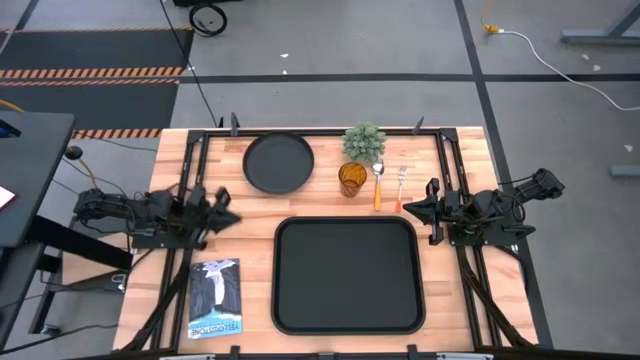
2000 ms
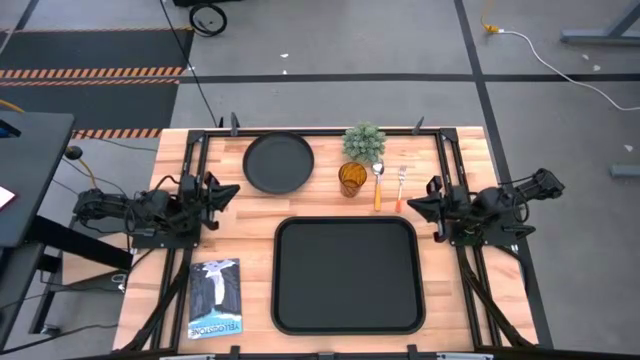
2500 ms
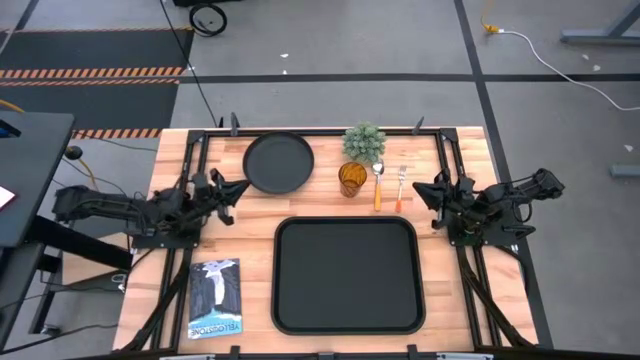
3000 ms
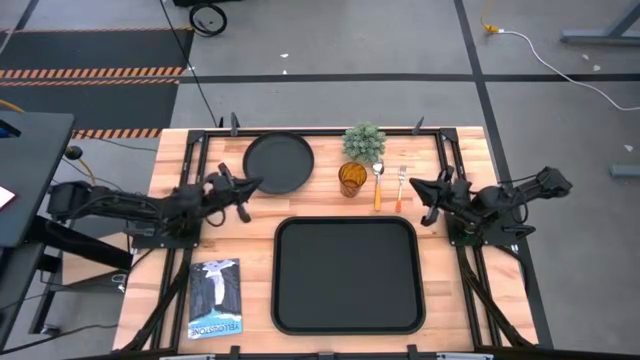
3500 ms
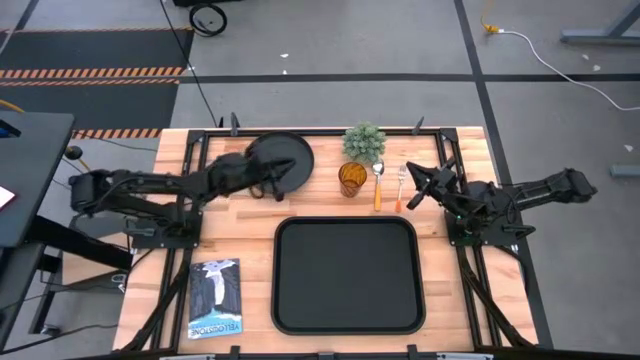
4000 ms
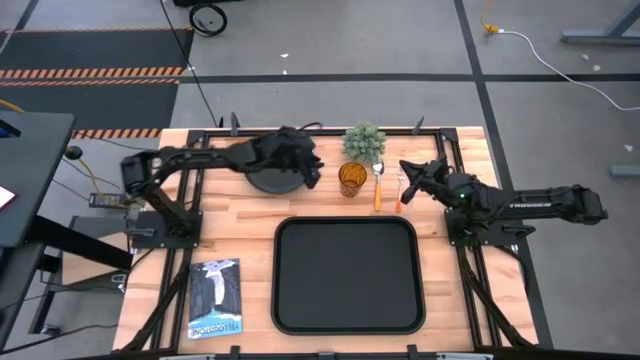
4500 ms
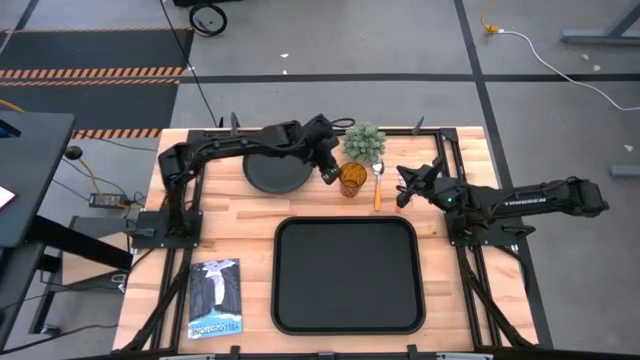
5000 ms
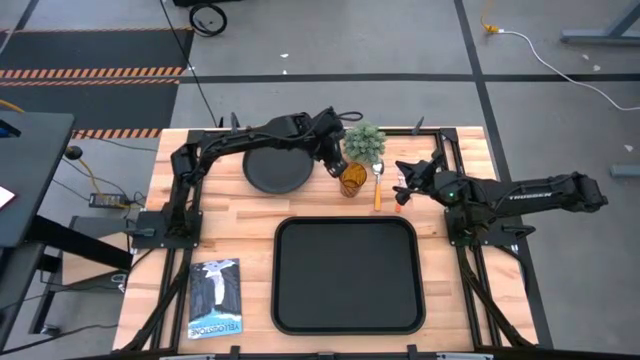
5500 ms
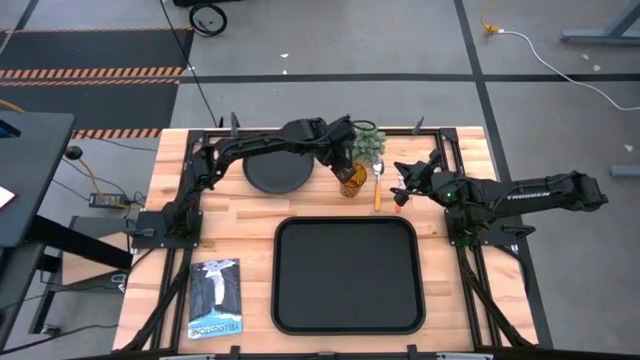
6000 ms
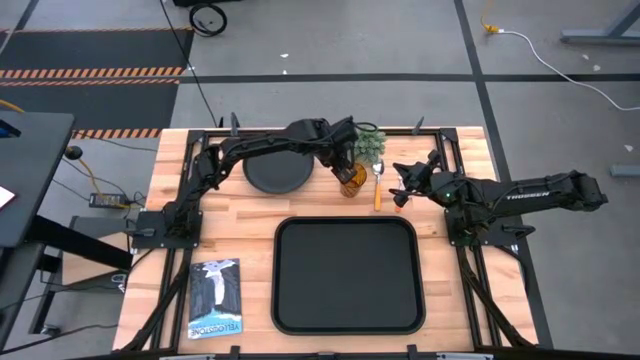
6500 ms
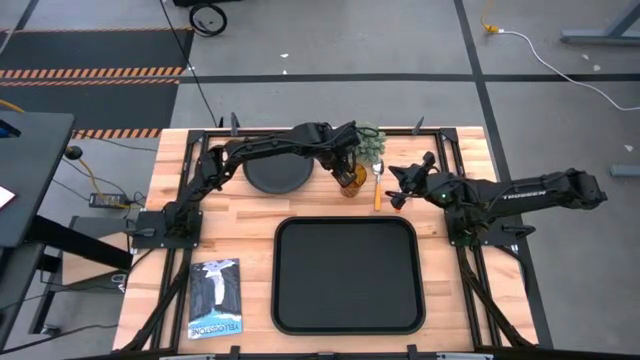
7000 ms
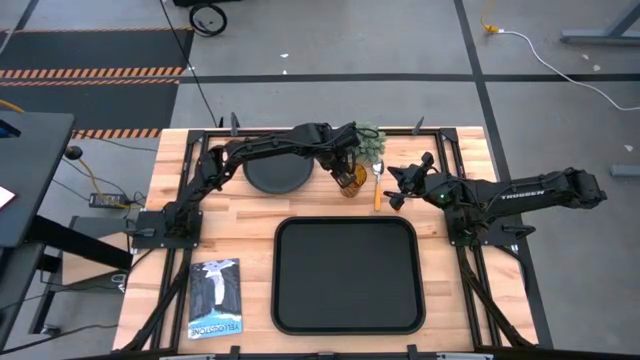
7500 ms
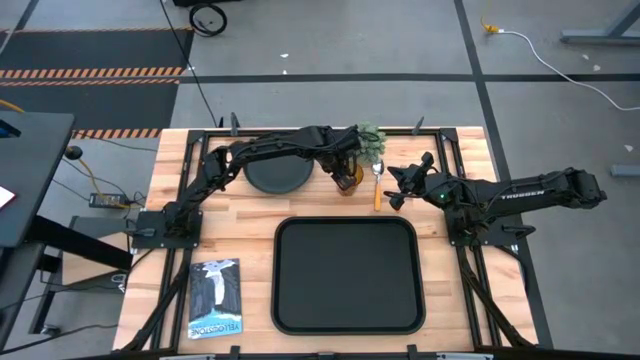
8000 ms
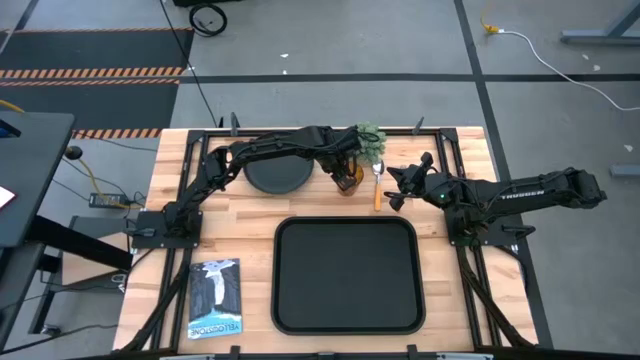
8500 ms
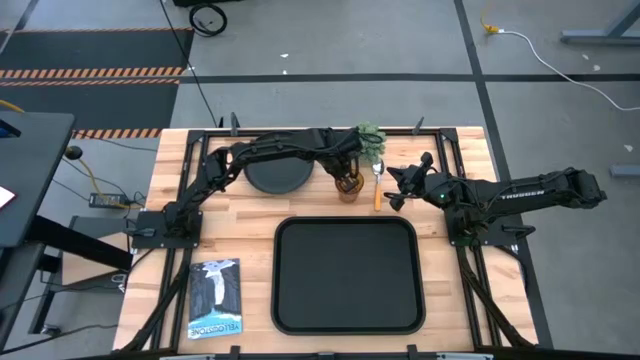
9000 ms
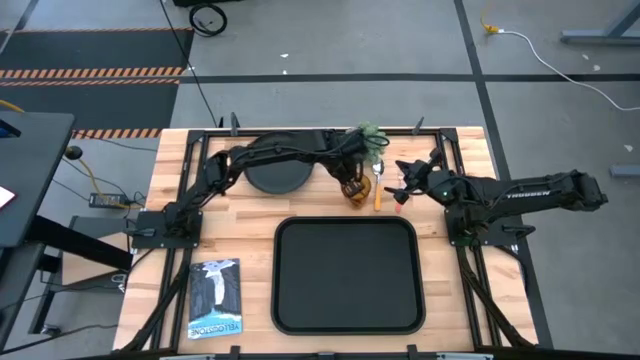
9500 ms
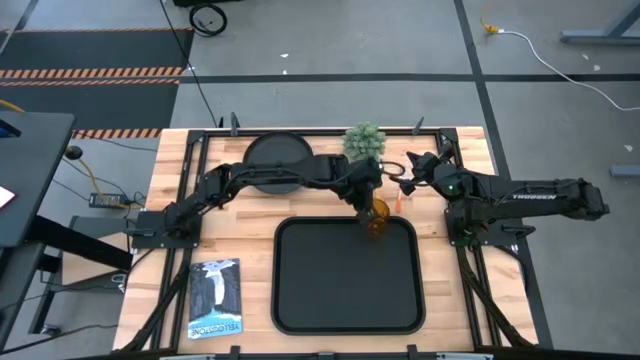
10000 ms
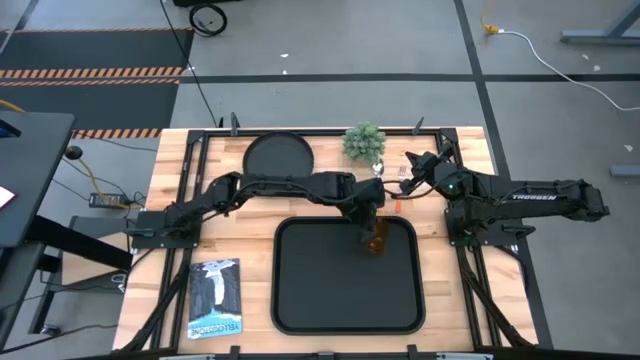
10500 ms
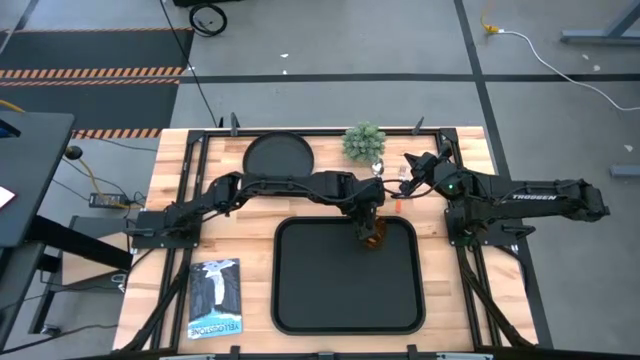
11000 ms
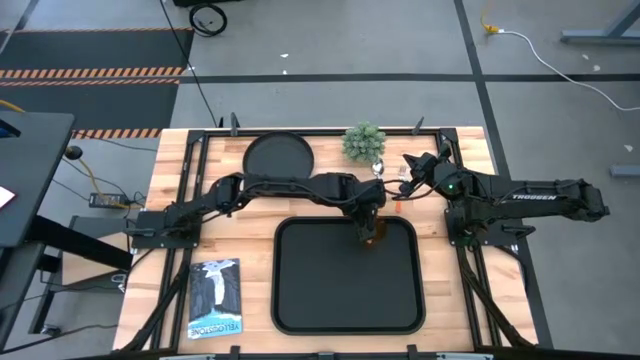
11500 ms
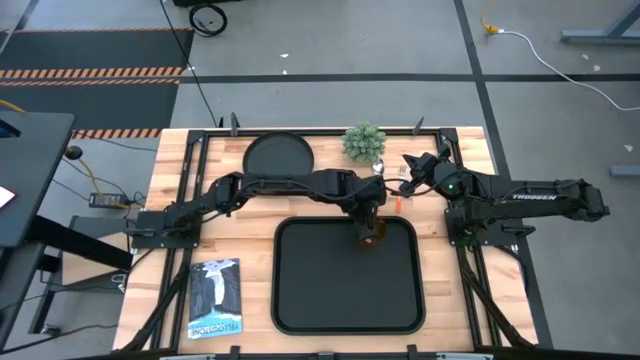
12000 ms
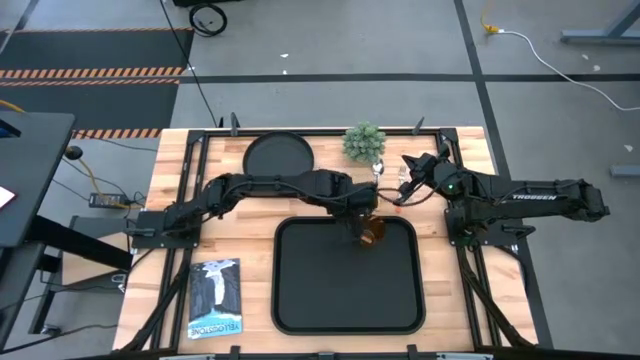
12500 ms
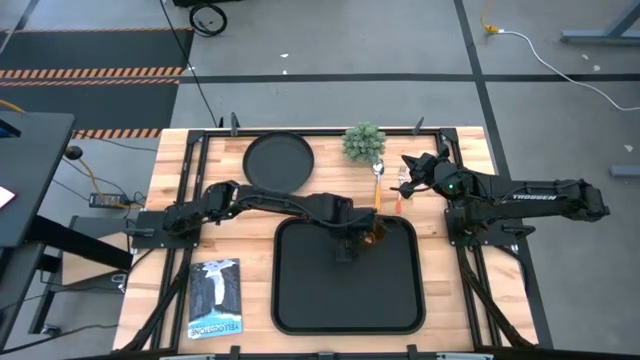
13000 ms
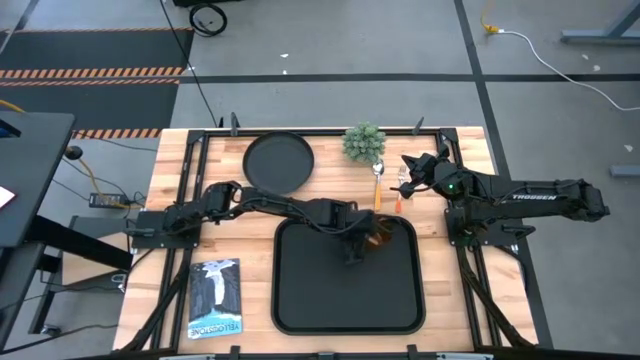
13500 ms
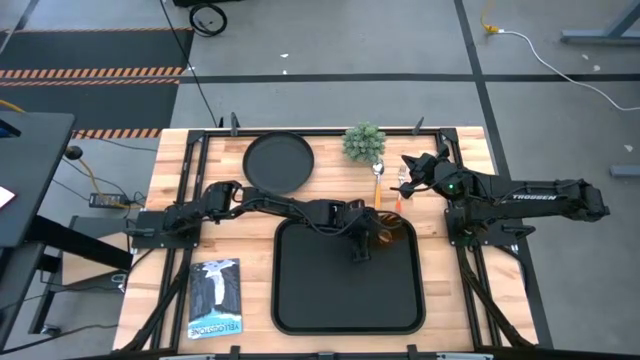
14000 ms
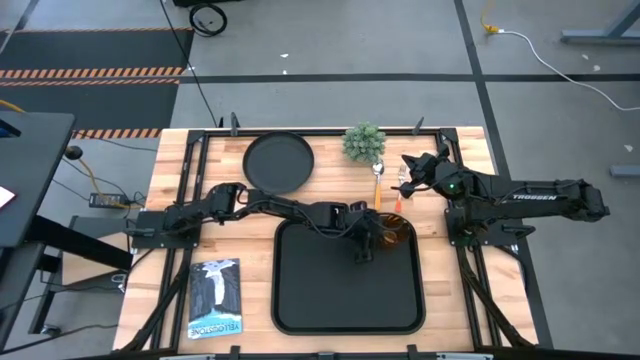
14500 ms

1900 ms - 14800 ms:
Task: Pick and place plate/cup/fork/spoon on tray
Put the brown cup on the black tray

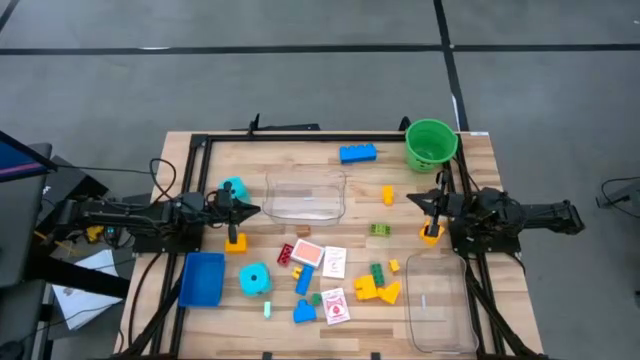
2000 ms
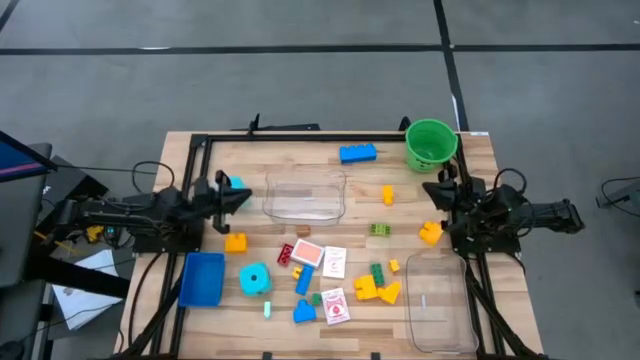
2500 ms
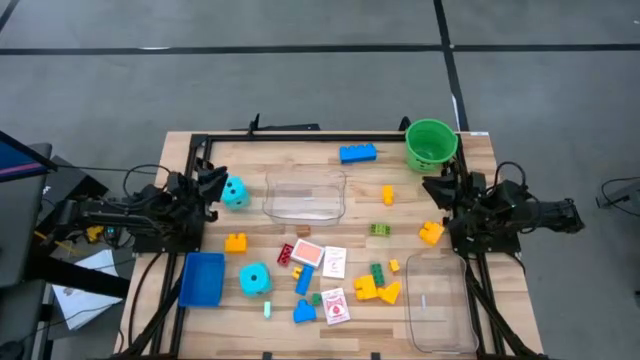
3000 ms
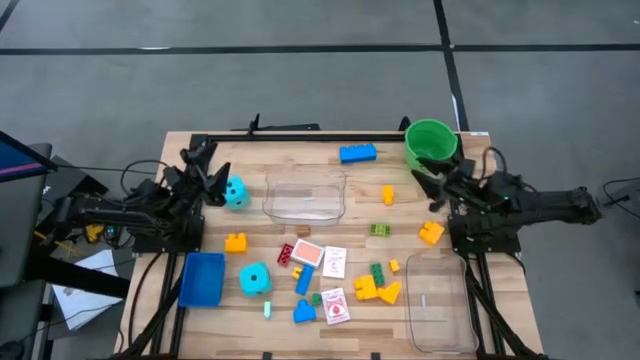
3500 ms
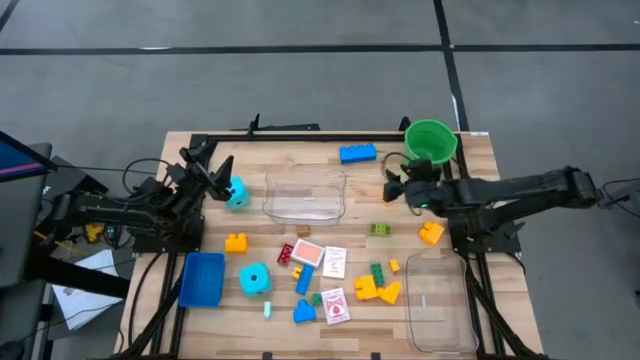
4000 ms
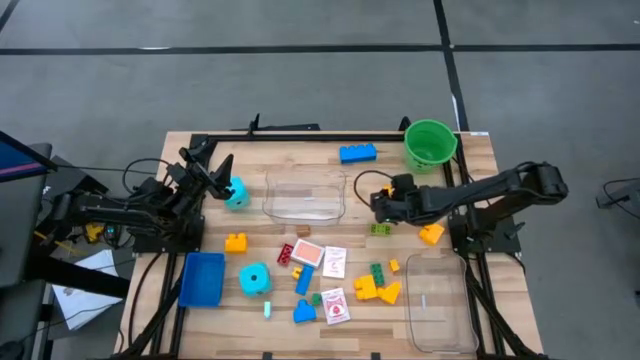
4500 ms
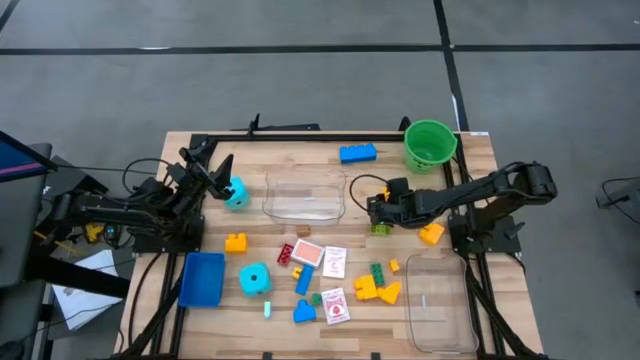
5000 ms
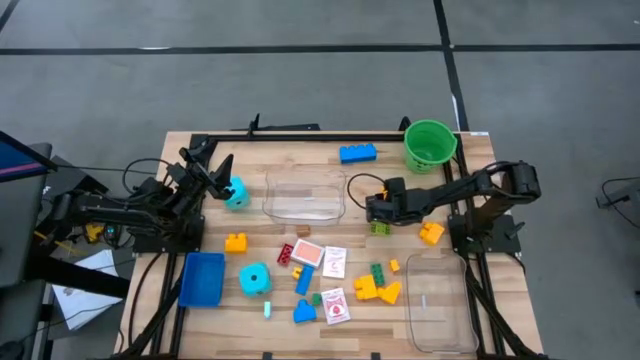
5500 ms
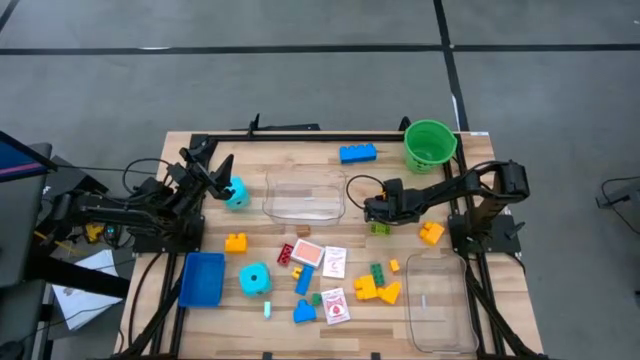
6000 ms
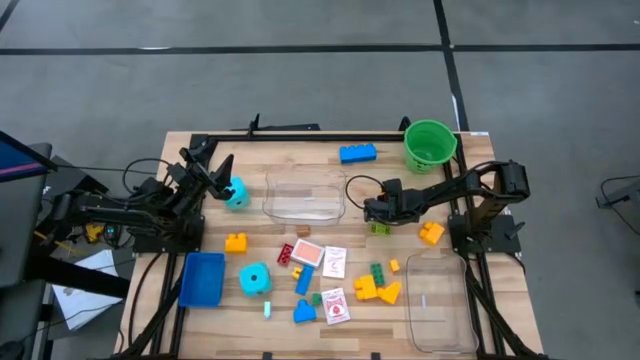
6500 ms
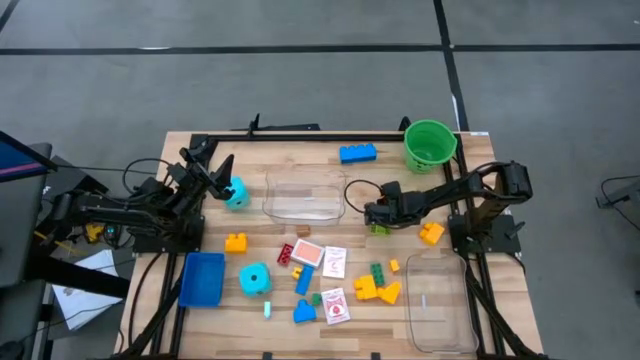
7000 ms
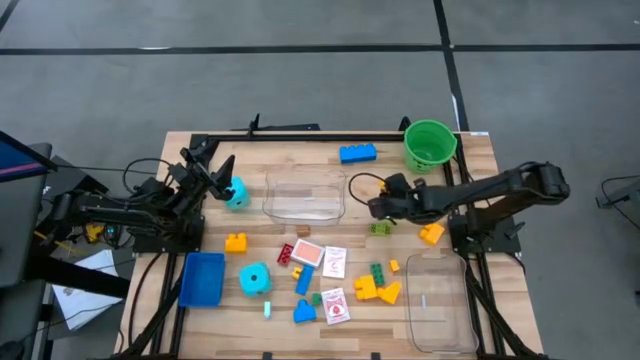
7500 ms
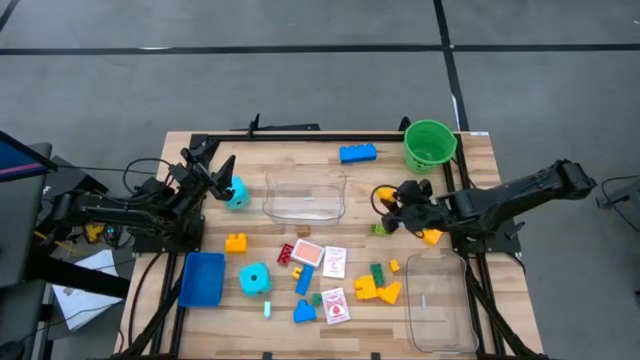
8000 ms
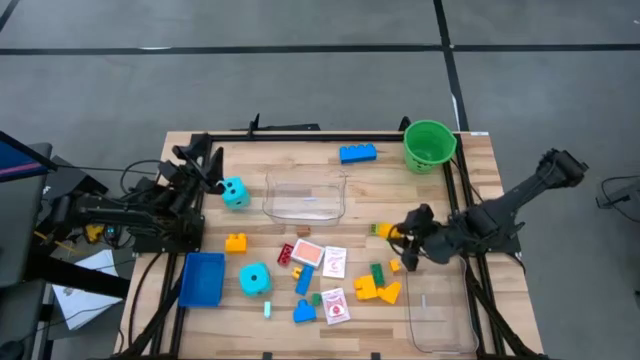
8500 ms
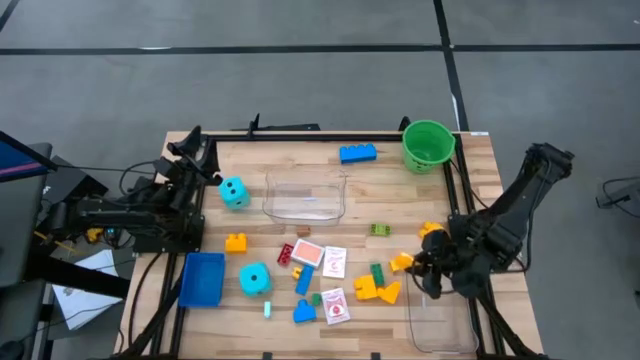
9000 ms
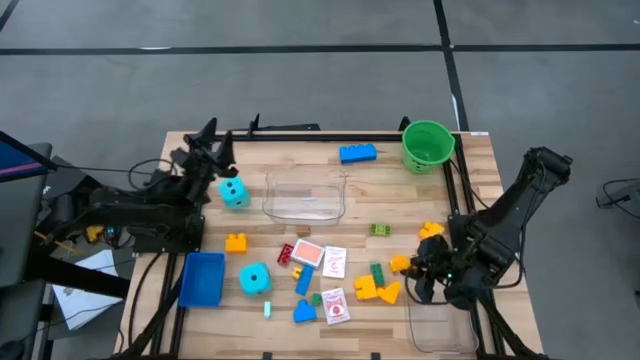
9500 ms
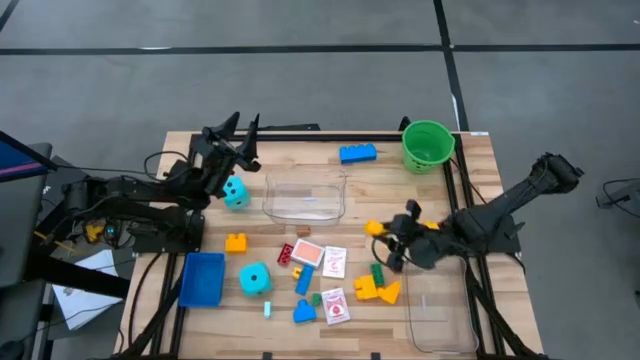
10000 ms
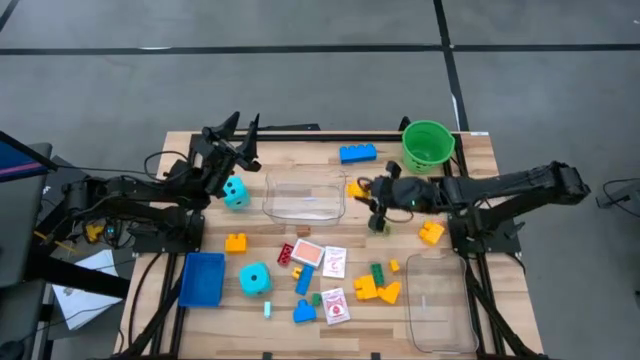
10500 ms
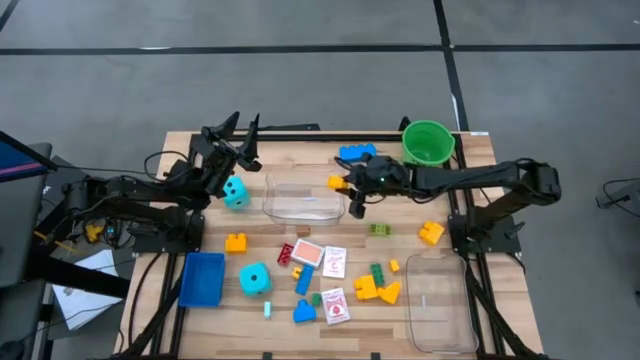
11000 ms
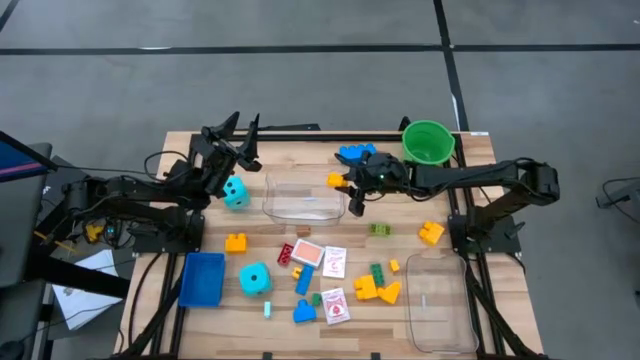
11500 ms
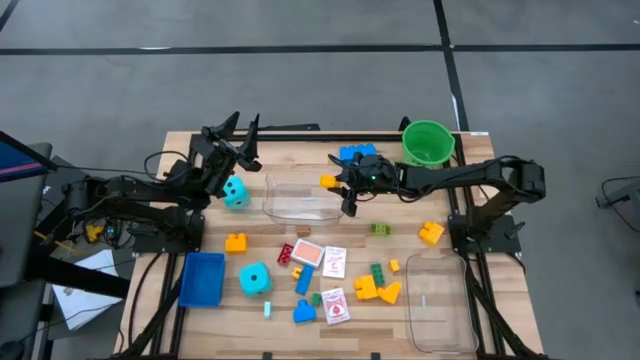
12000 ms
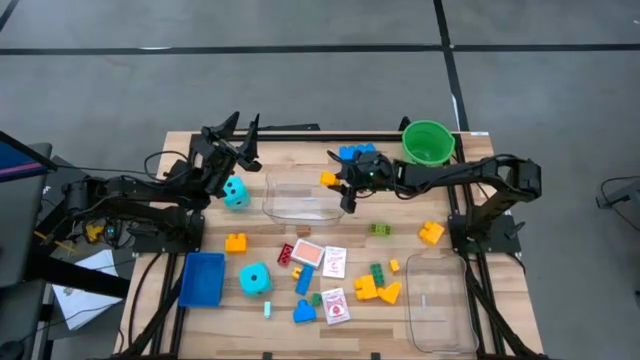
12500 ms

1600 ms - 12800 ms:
Task: Pick & Place Toys
Put the yellow game piece into the top transparent bin
